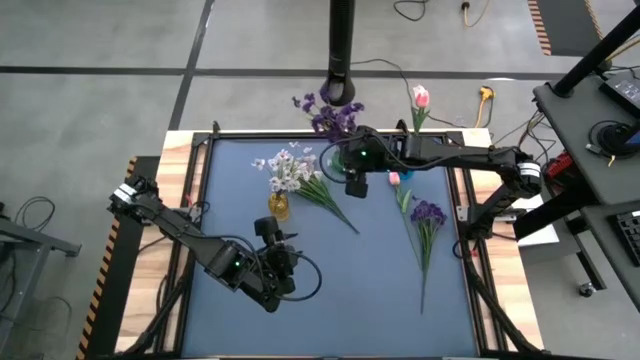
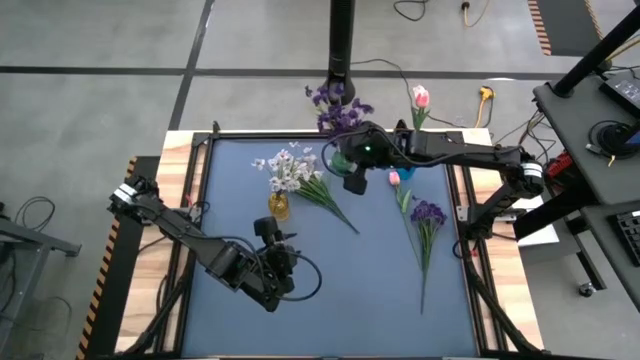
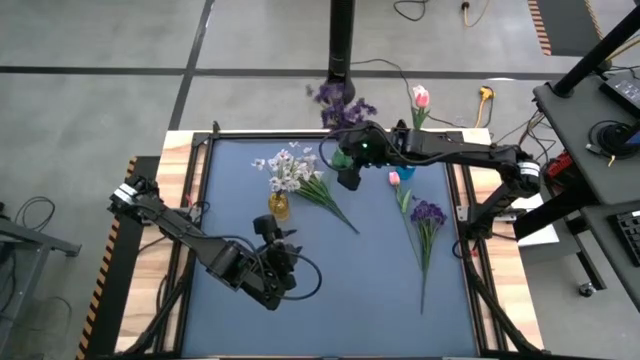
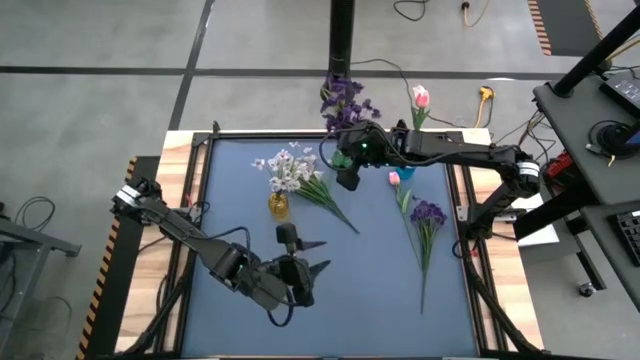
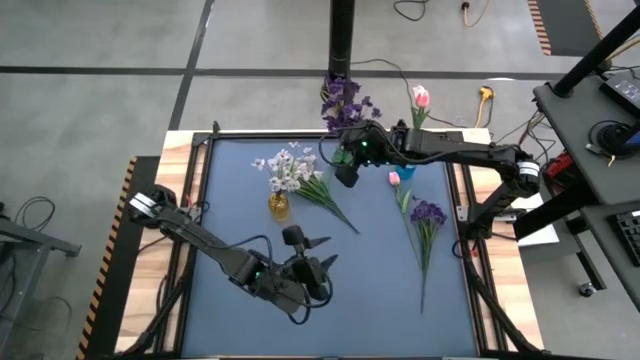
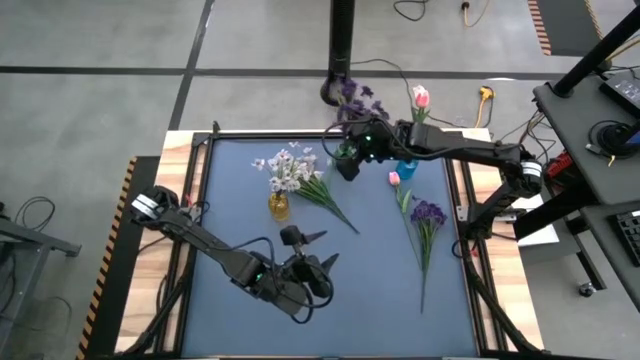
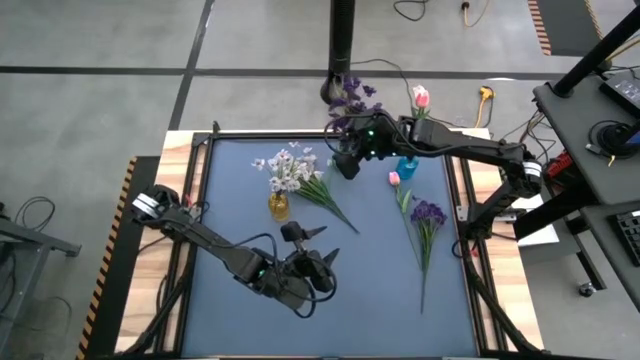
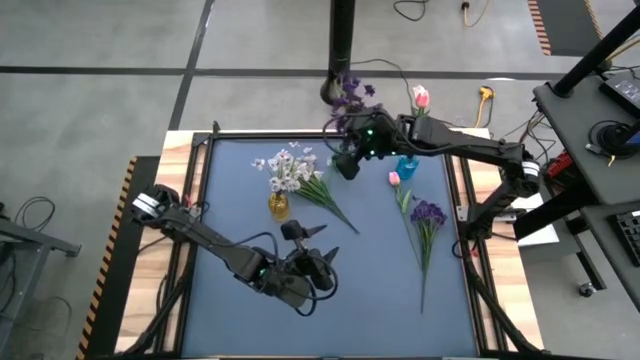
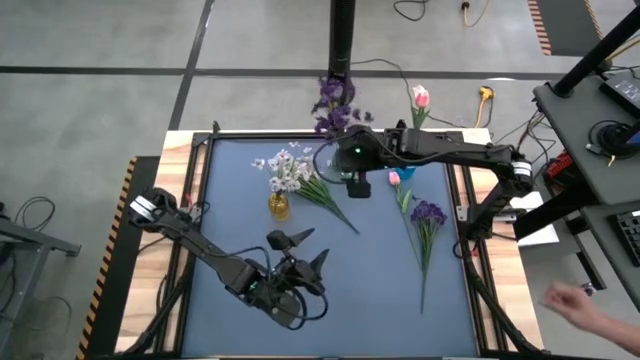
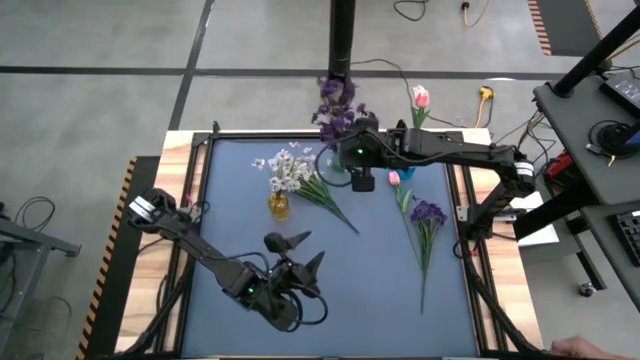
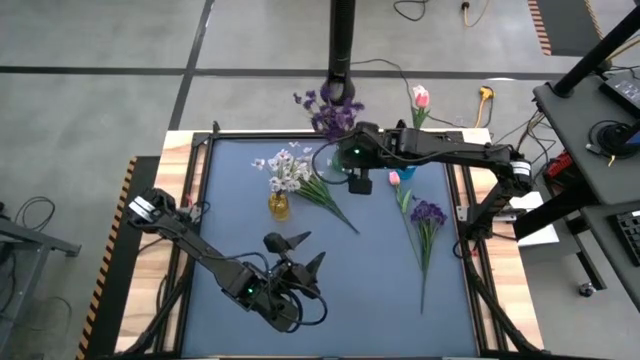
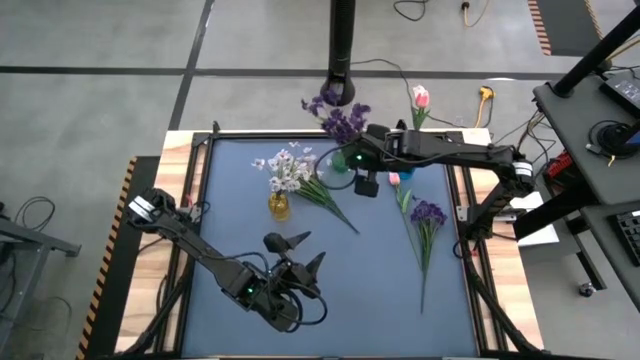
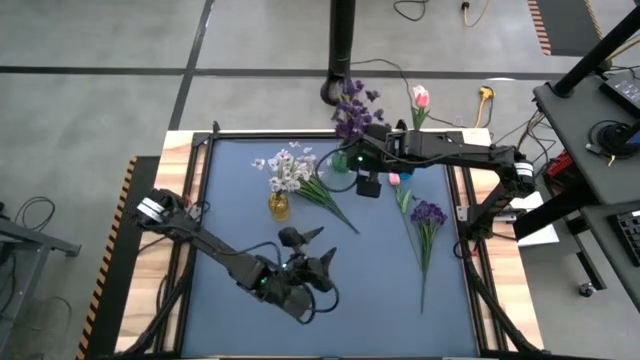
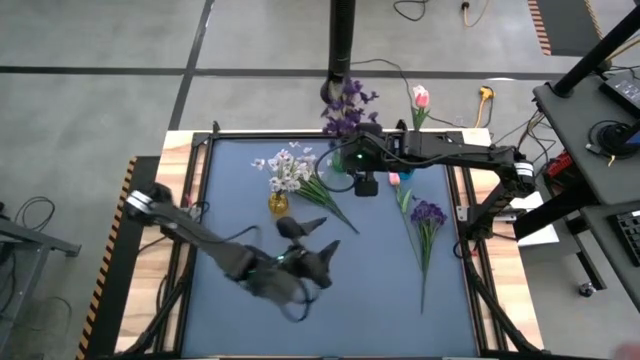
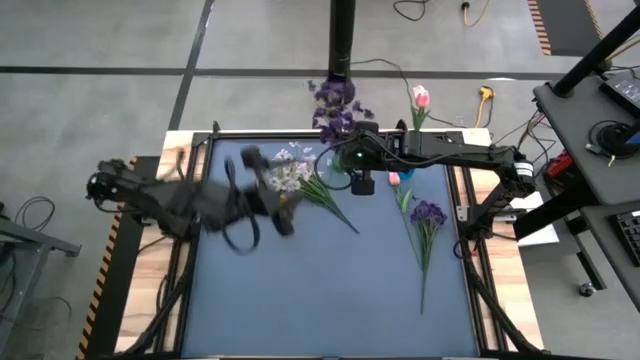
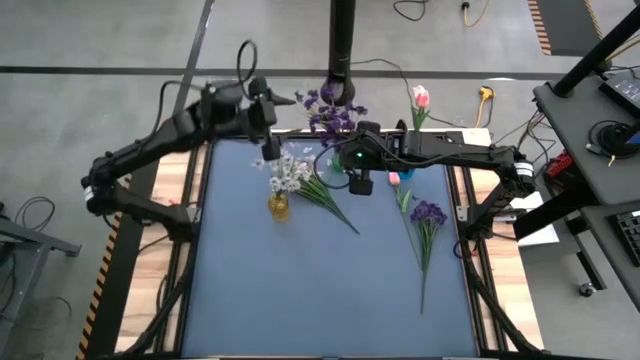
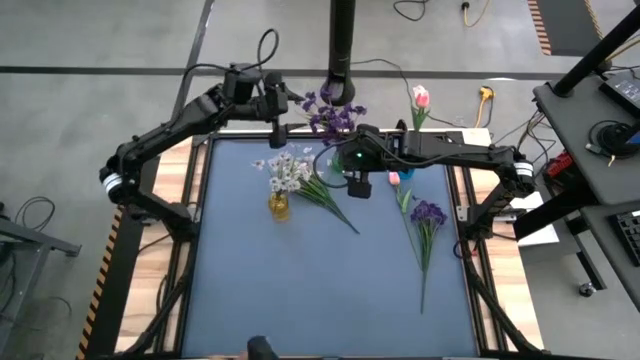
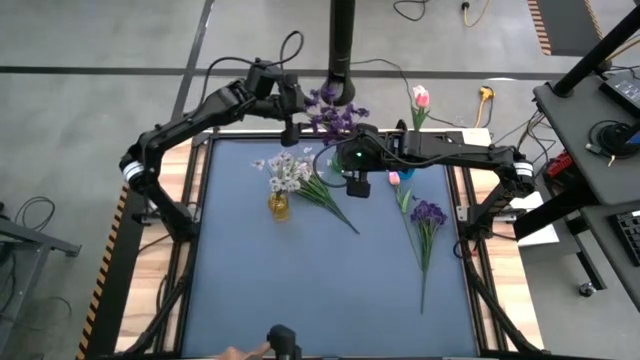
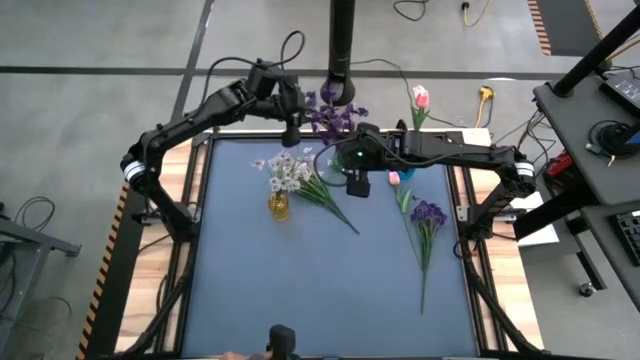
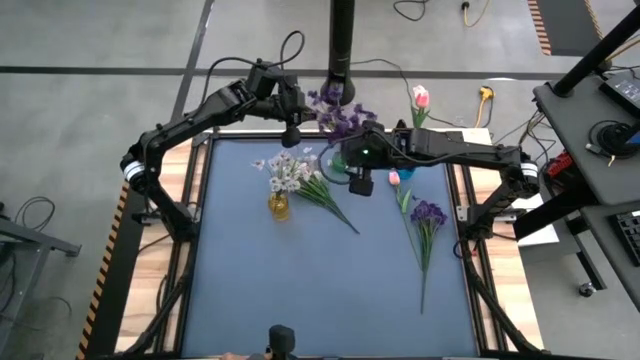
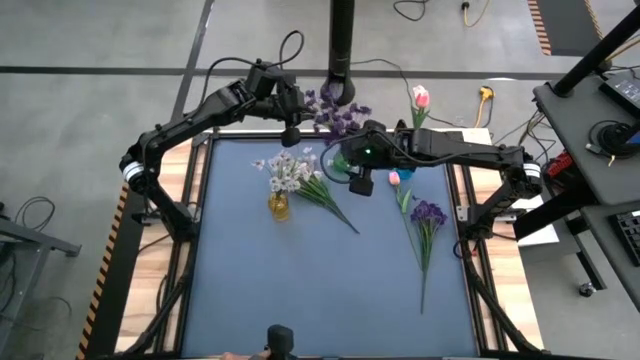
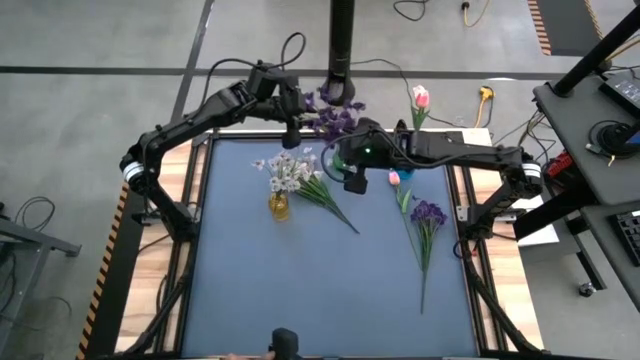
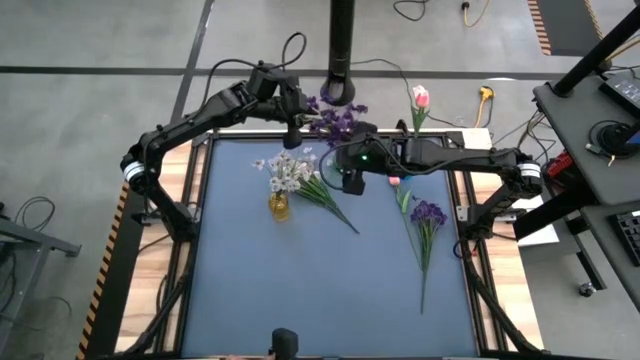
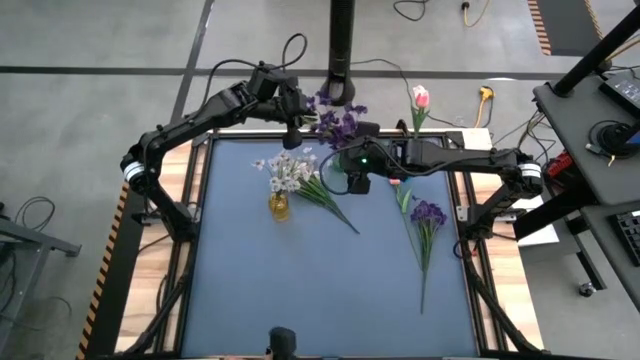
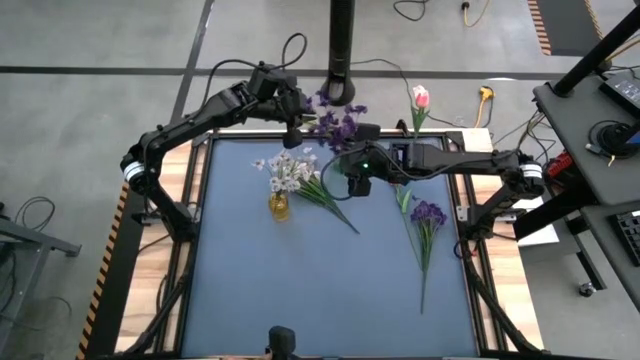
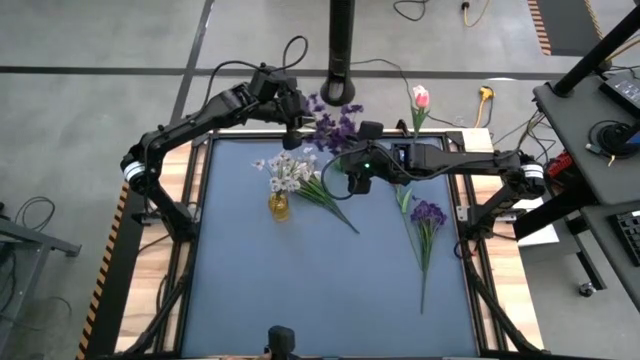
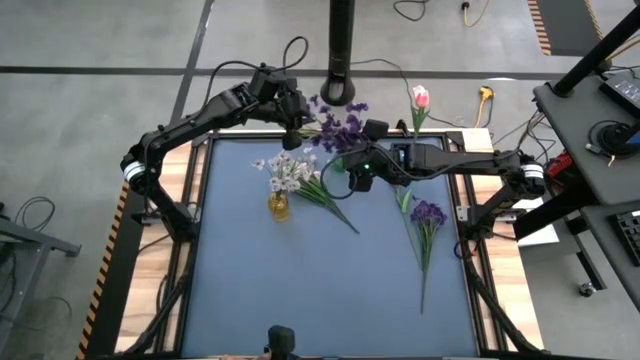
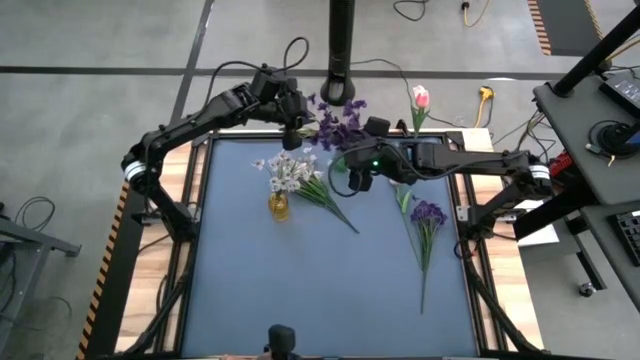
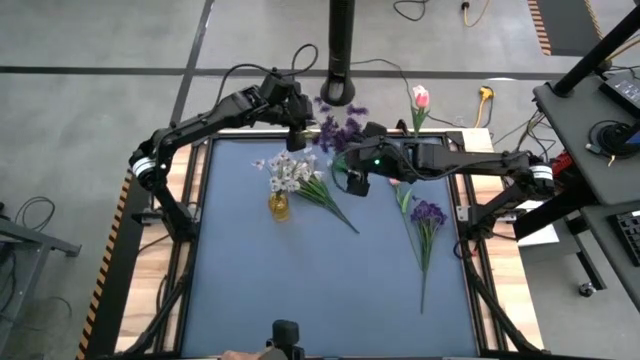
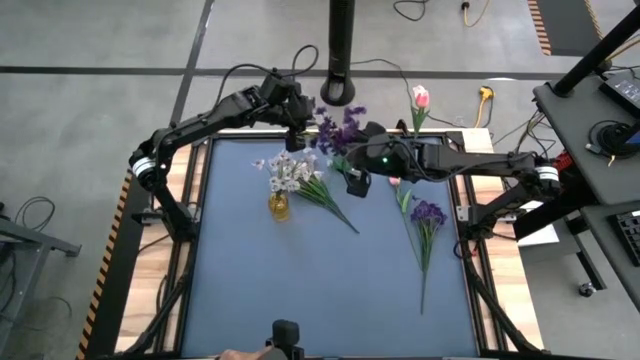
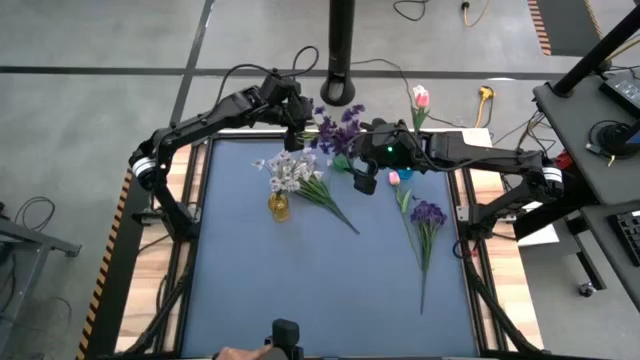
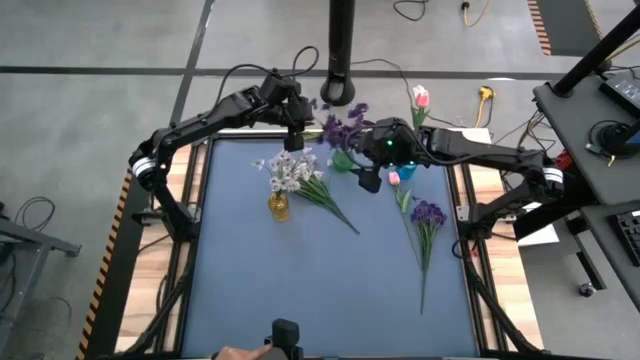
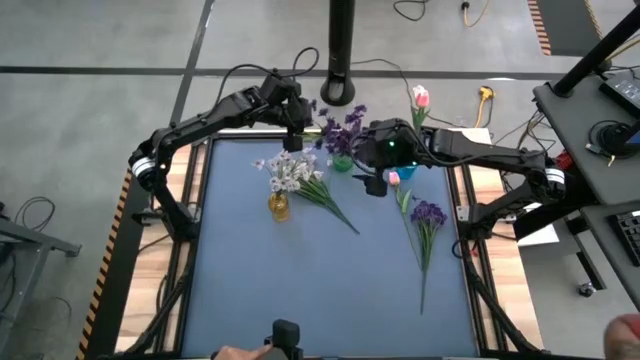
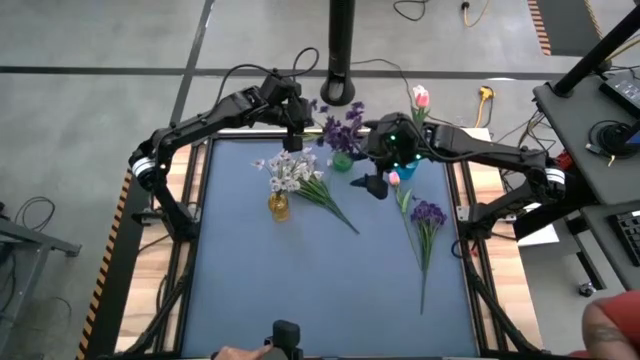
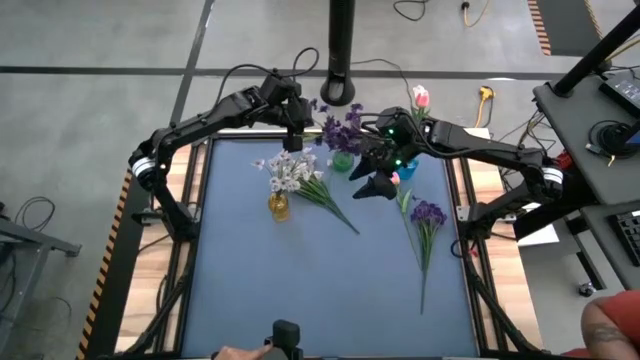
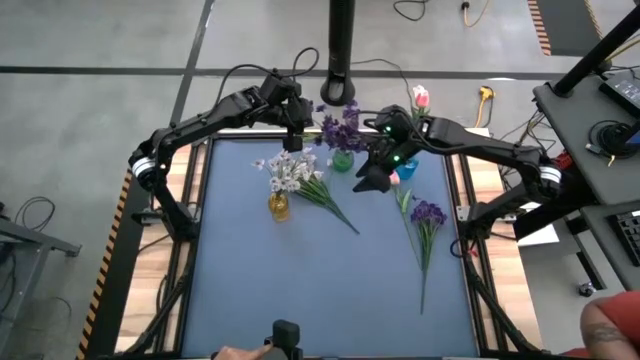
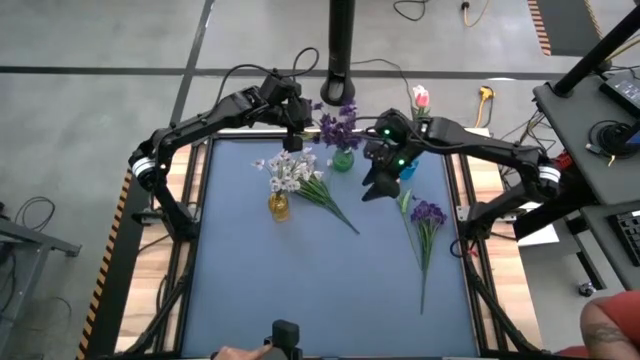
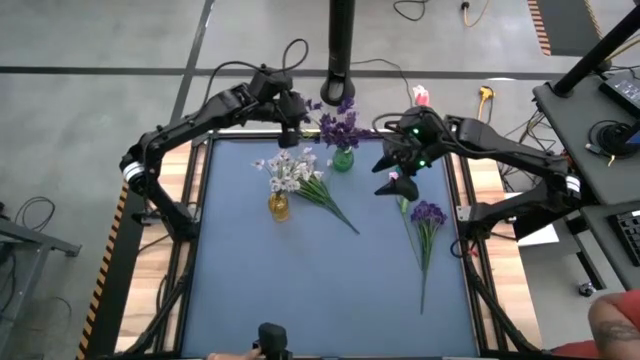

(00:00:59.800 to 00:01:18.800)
Task: Sort flowers into vase by color
Put the left purple flowers into the green vase
